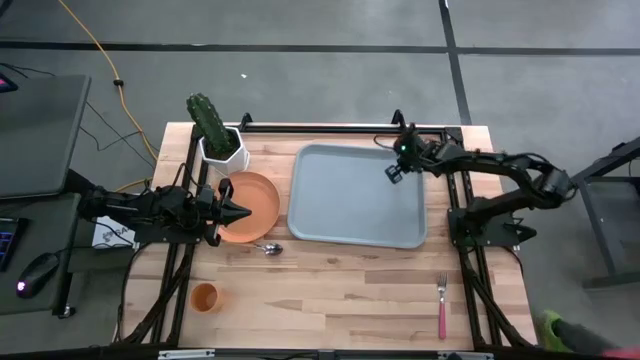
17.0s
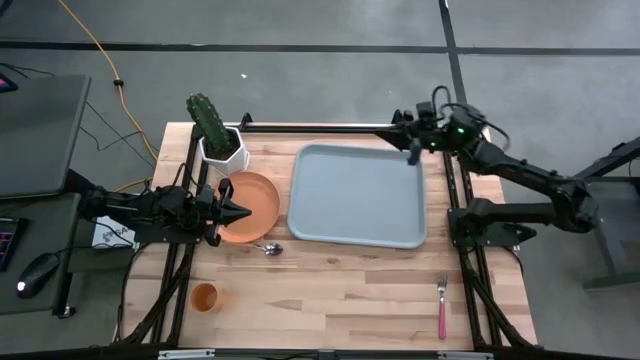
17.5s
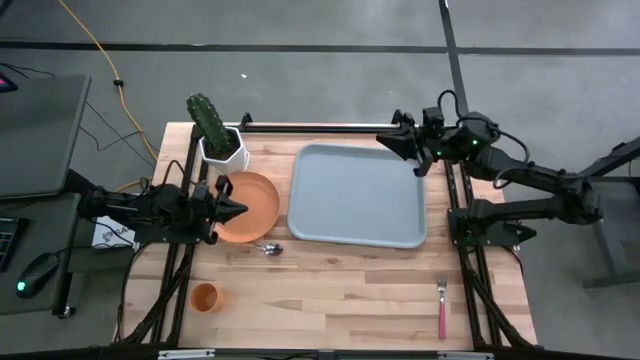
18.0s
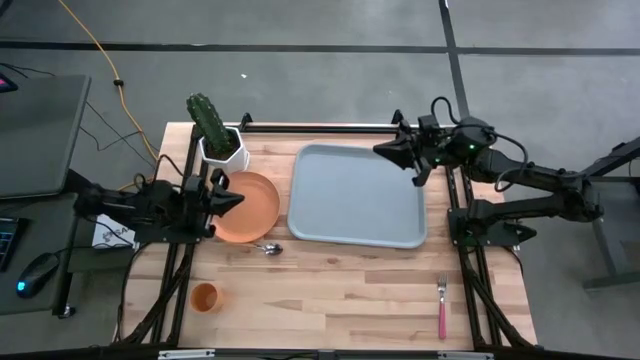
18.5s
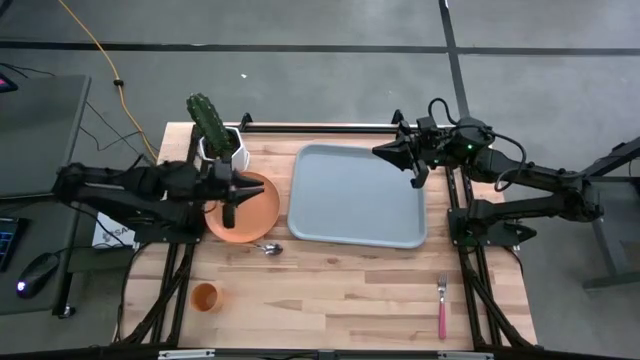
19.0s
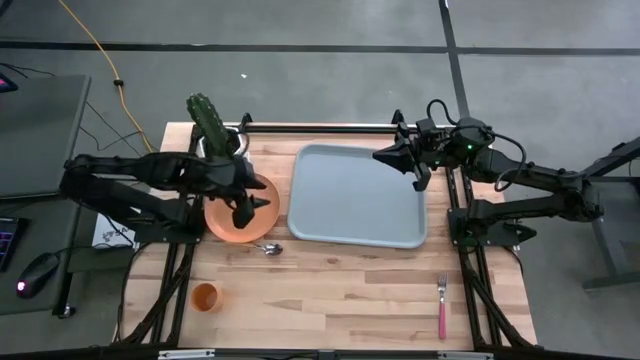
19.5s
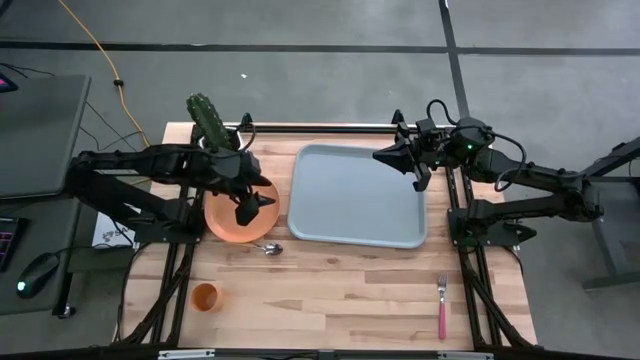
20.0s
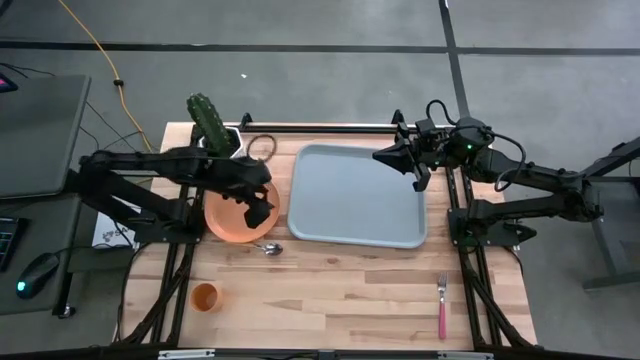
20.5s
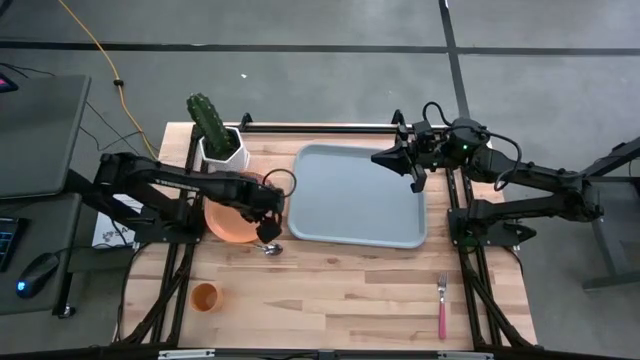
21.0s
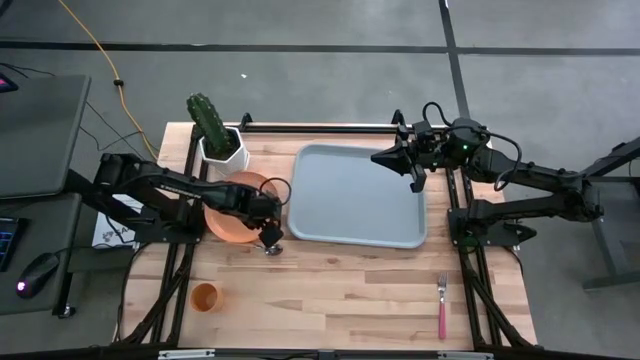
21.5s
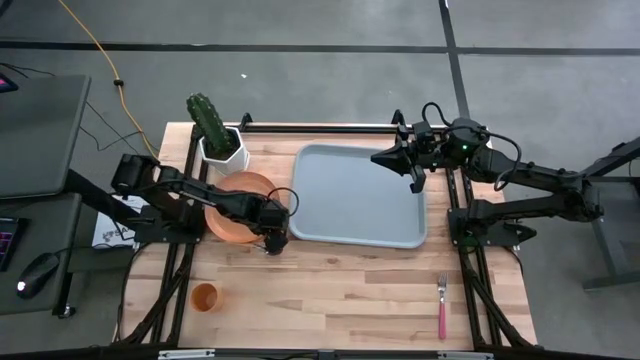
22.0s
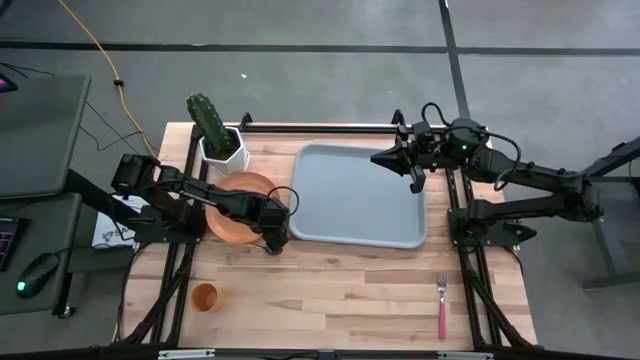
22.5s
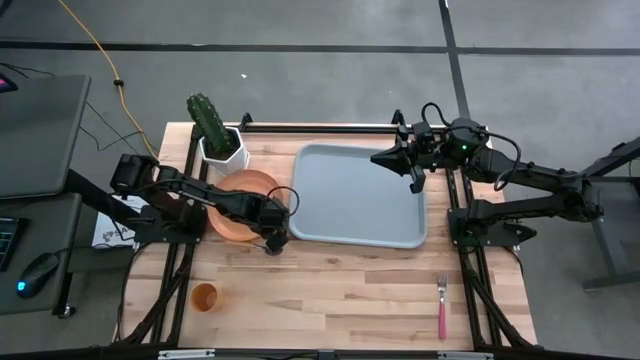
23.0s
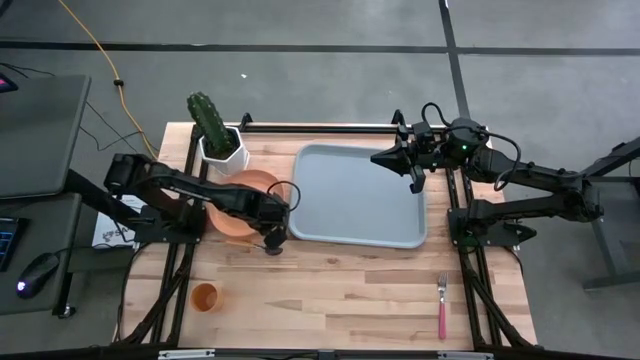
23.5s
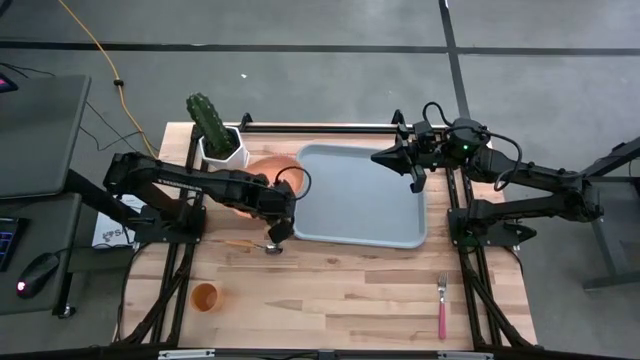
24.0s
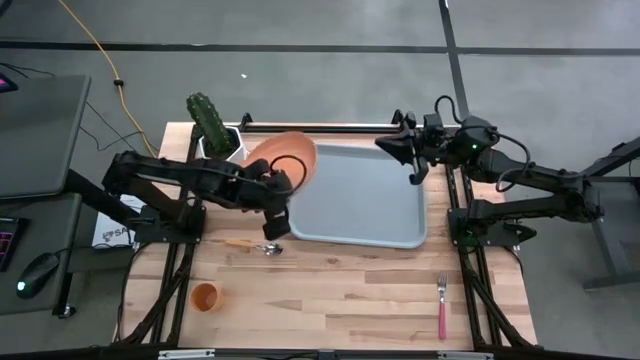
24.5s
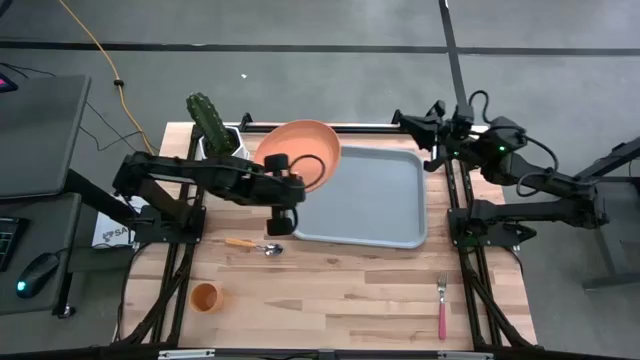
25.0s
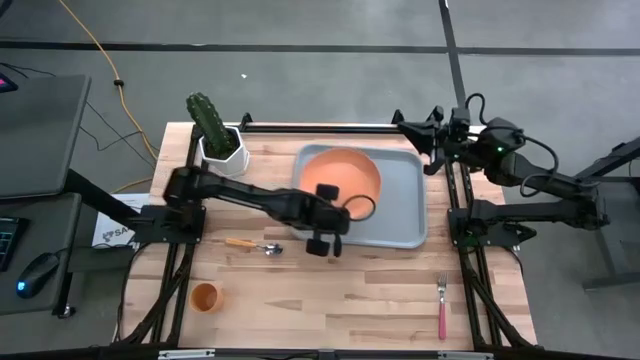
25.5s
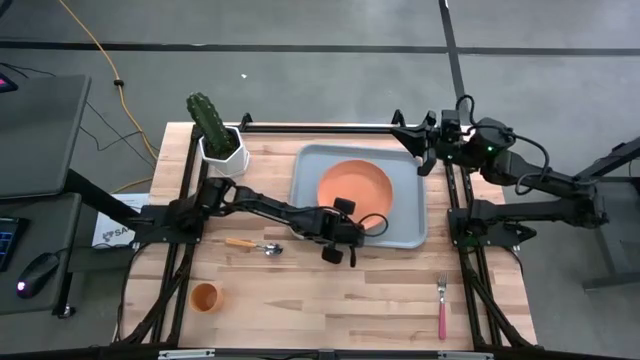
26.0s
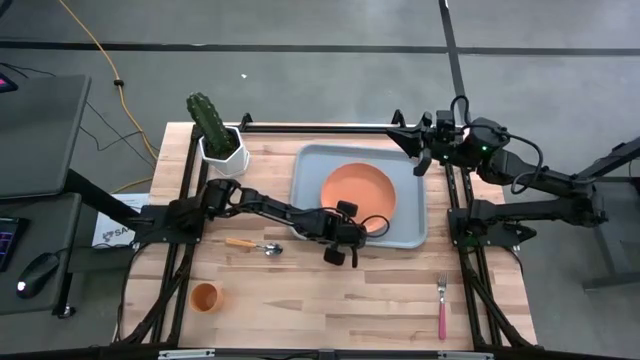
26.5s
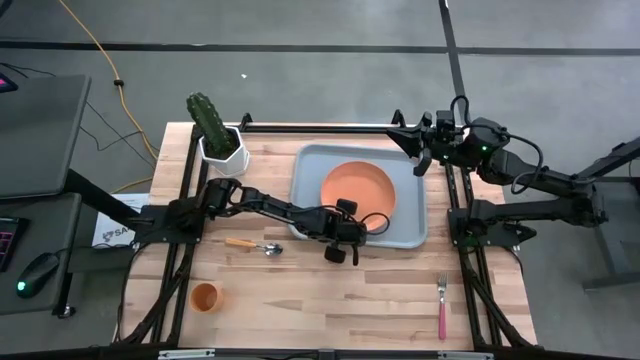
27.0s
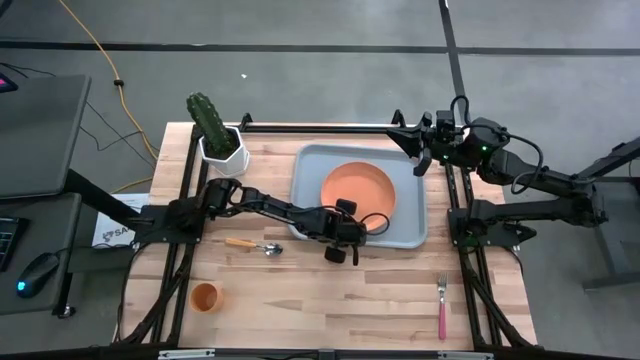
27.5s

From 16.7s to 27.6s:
Task: Pick and place plate/cup/fork/spoon on tray
Put the orange plate on the gray serving tray

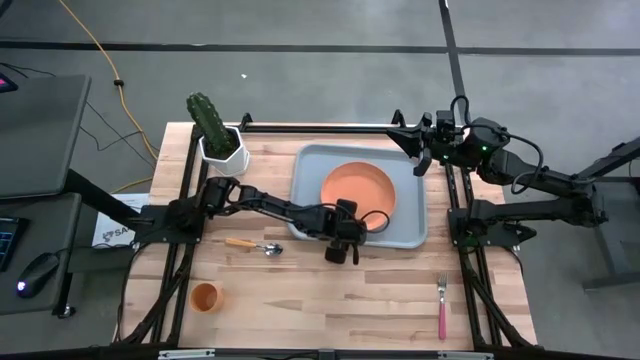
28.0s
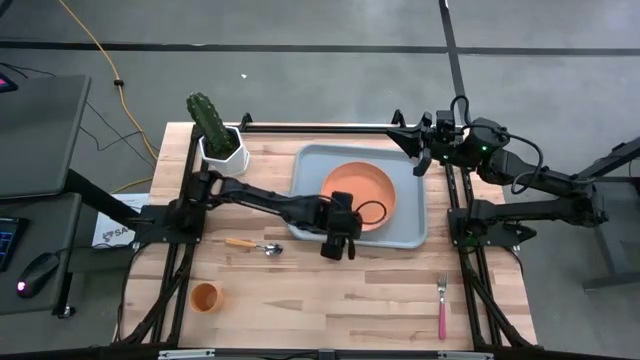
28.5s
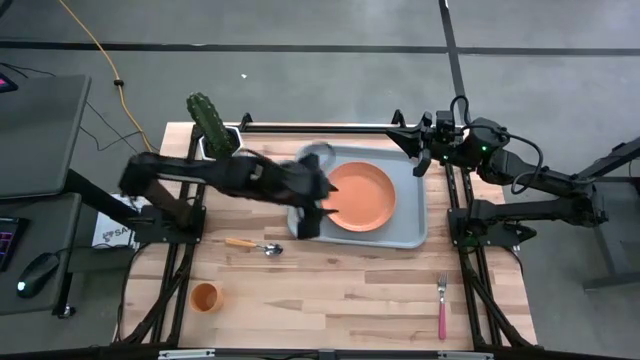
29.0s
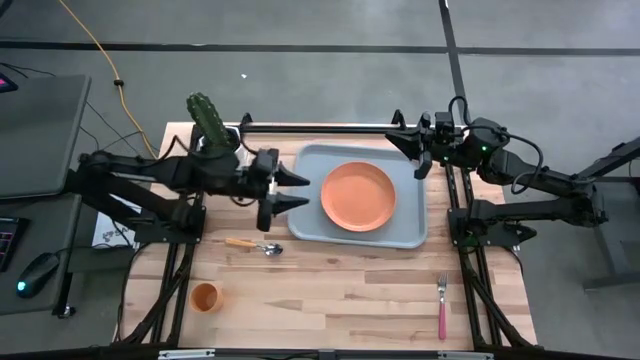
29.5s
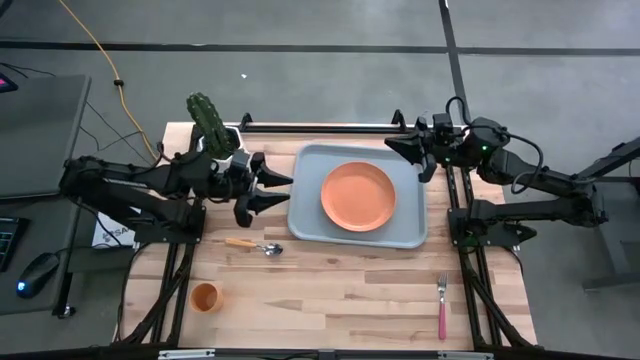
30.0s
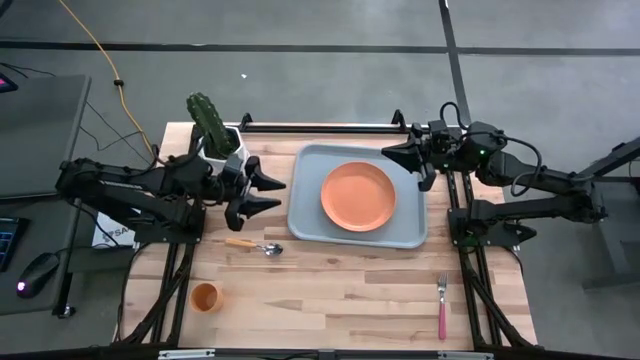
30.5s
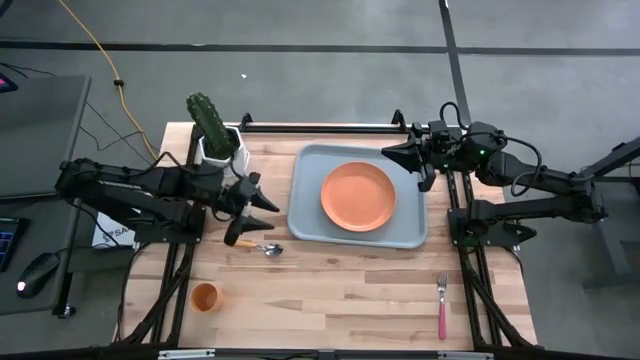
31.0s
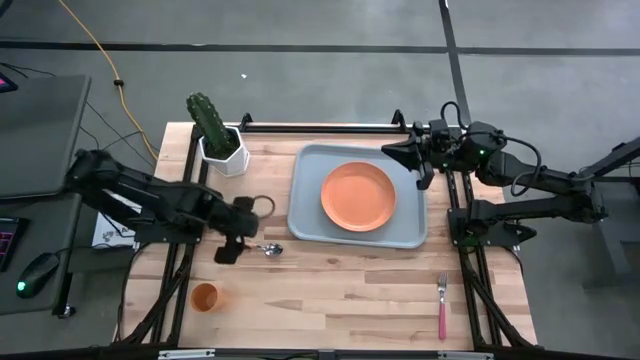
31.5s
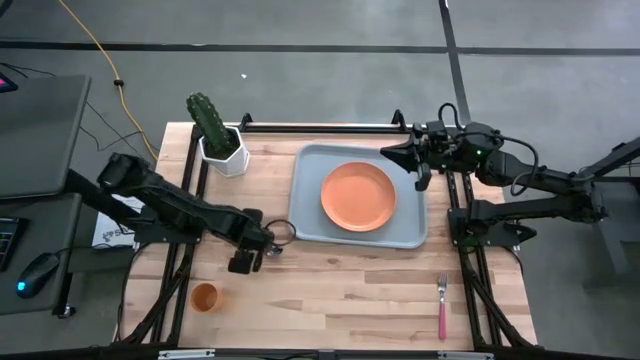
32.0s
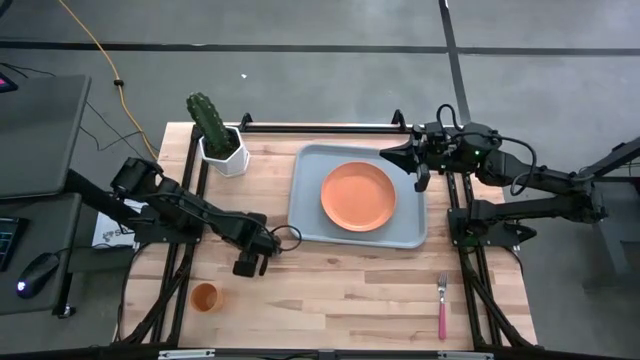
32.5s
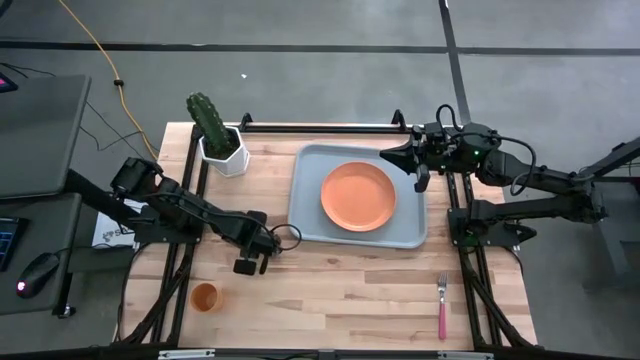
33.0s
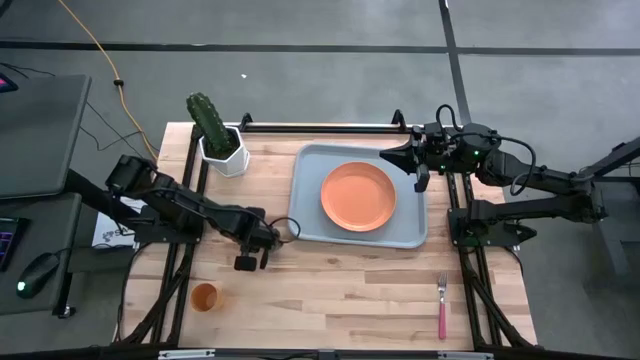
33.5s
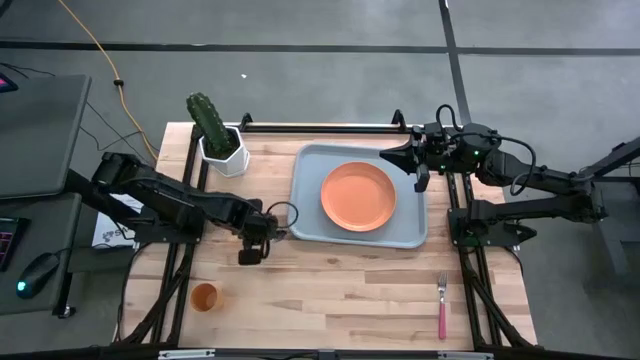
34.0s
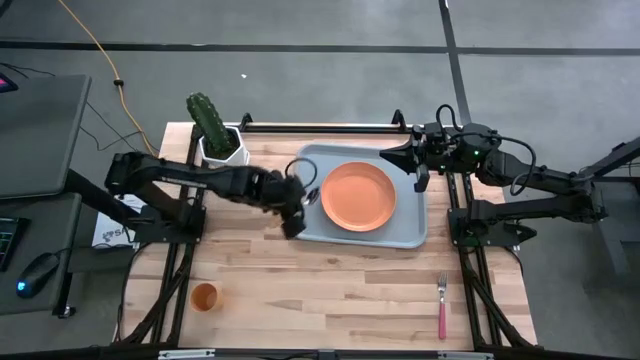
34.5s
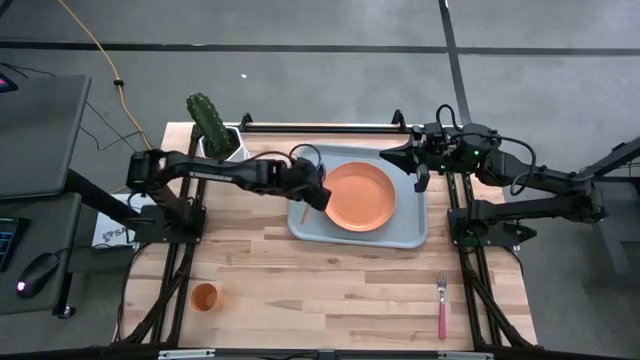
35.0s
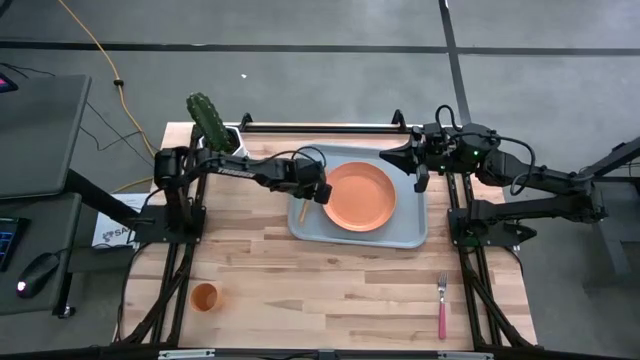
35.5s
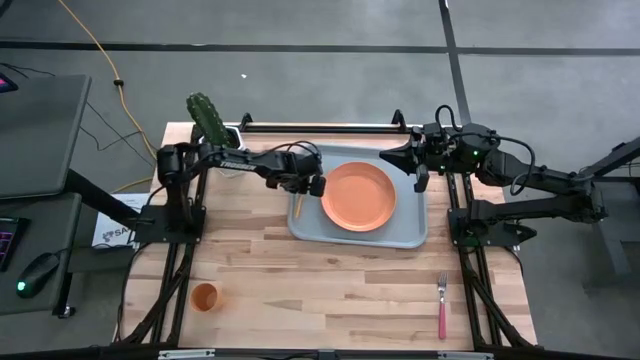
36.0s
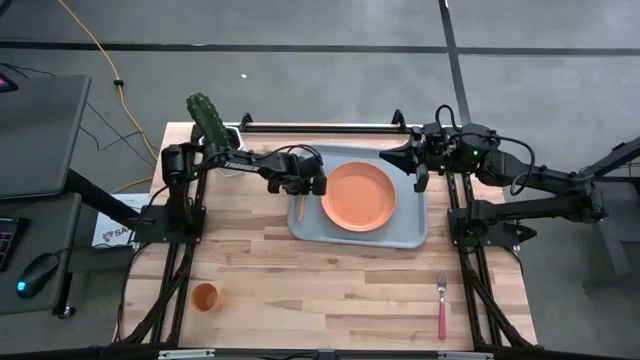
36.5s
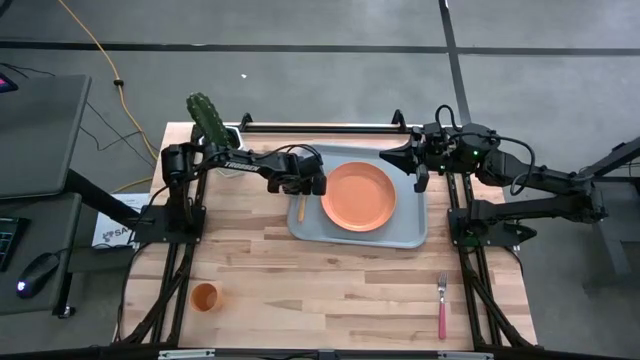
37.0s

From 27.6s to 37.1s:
Put the orange spoon to the left on the gray serving tray

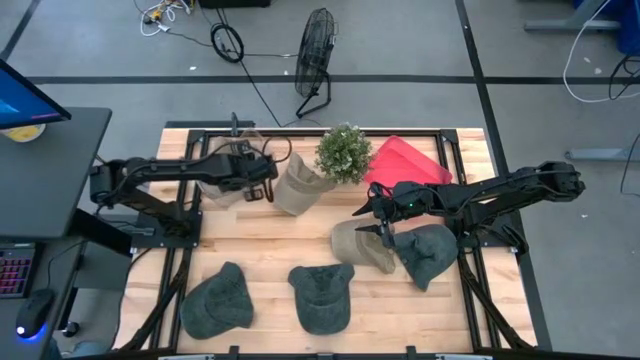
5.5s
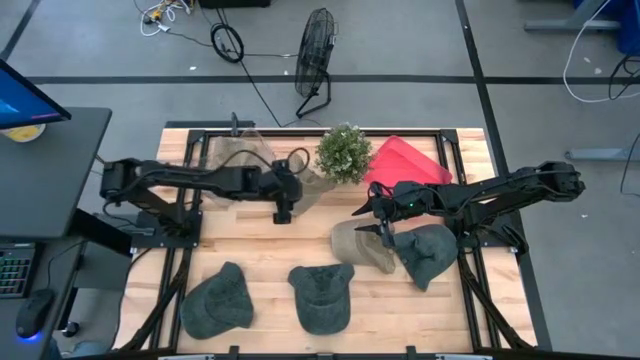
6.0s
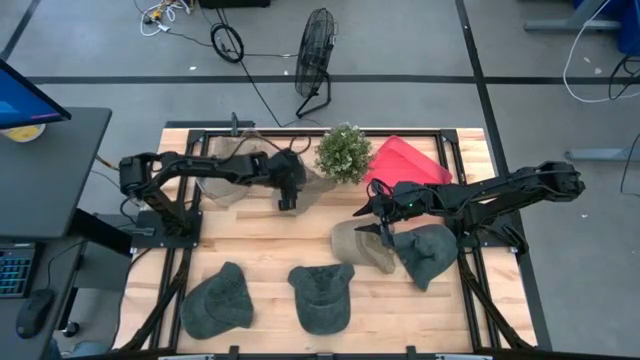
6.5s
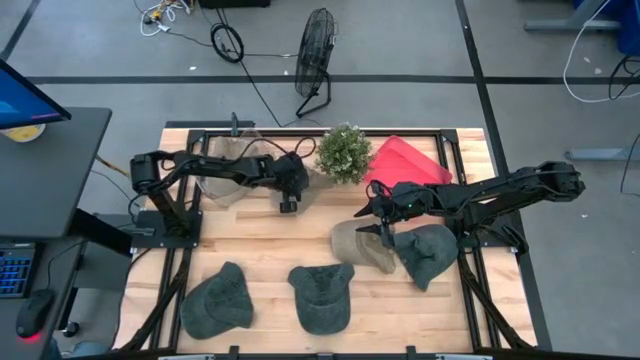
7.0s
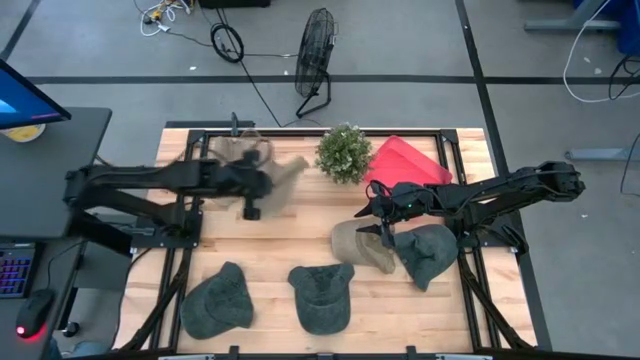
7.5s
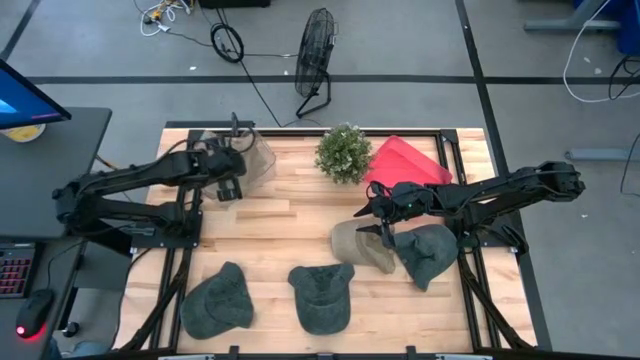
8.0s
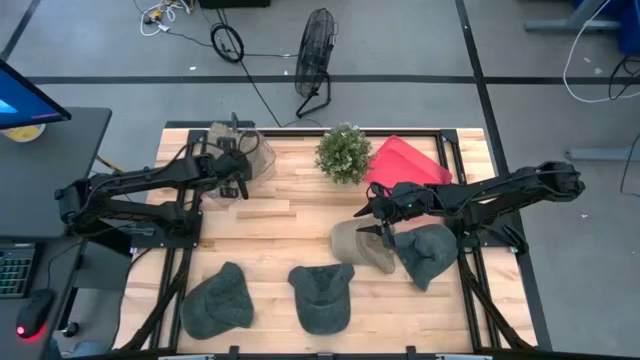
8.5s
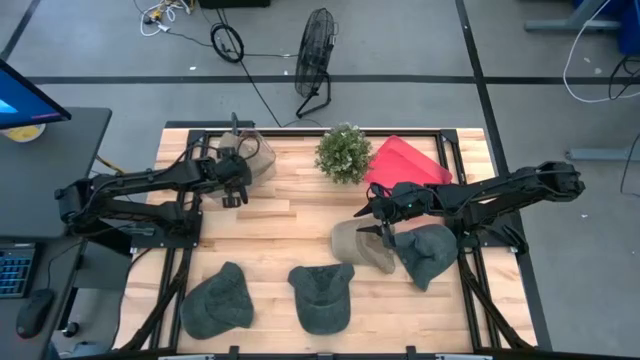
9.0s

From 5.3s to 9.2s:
Task: Pick & Place hat
Put the top brown cap into the transparent bin
